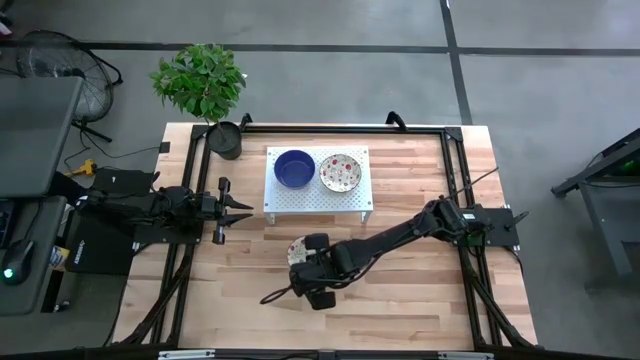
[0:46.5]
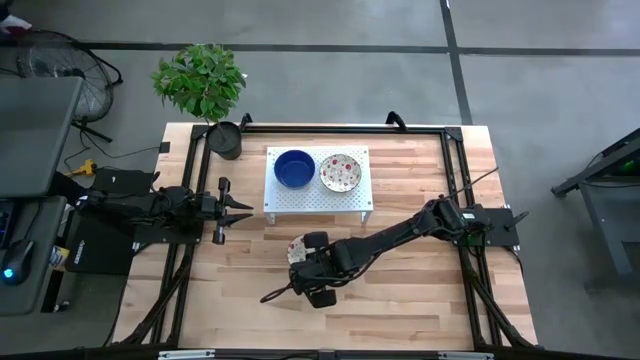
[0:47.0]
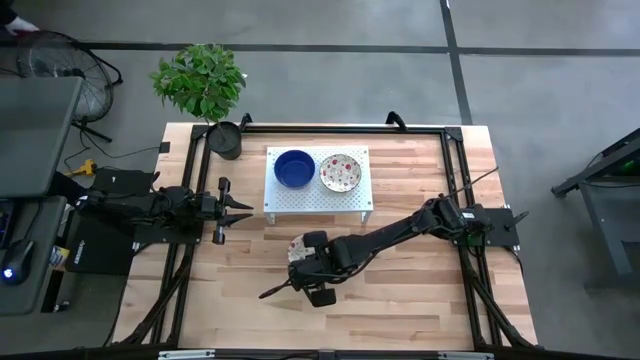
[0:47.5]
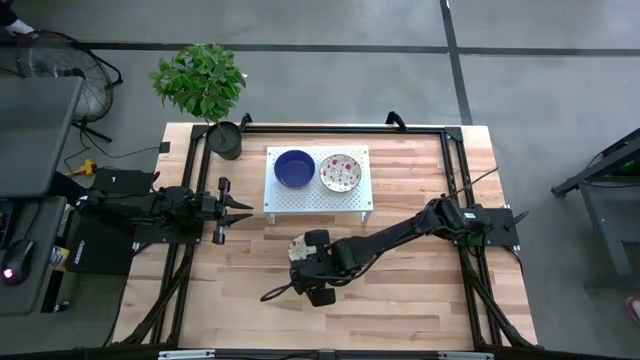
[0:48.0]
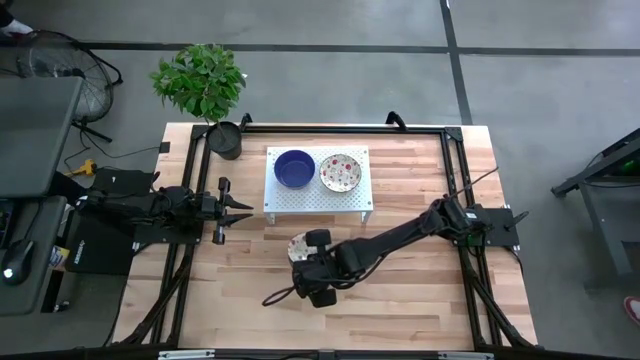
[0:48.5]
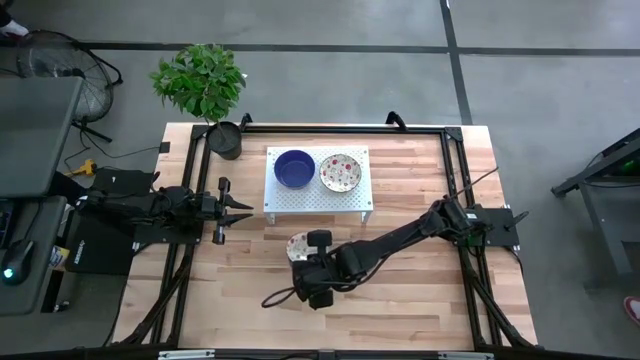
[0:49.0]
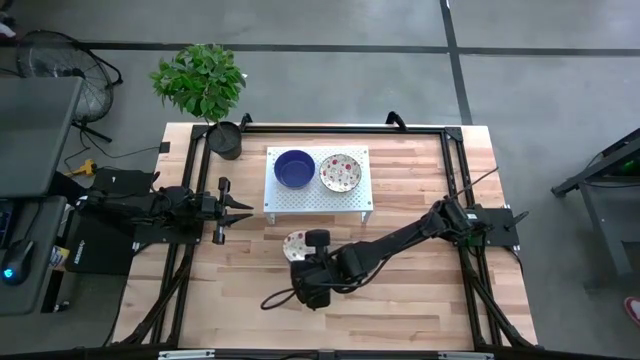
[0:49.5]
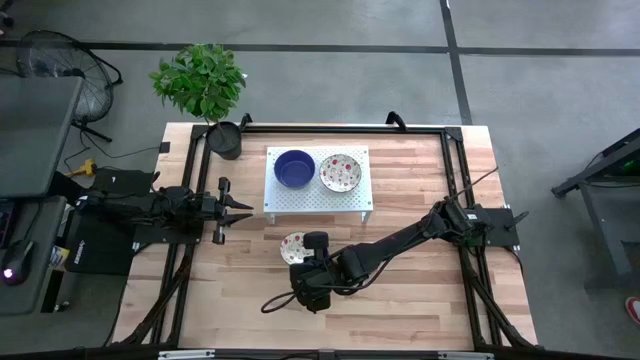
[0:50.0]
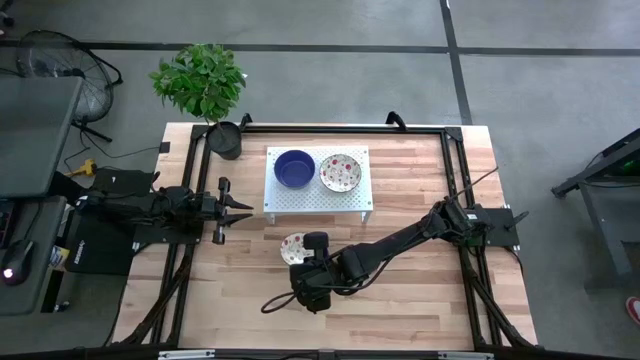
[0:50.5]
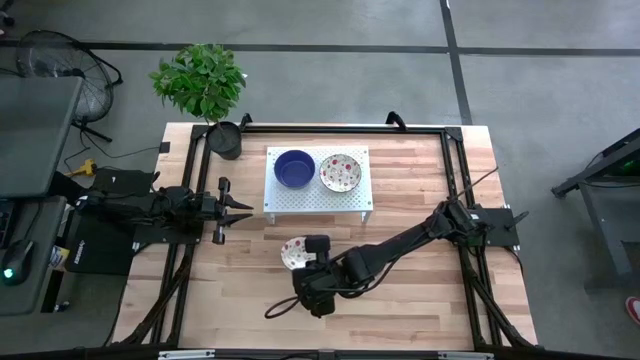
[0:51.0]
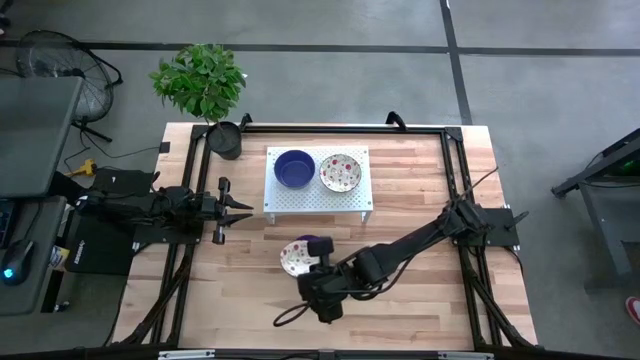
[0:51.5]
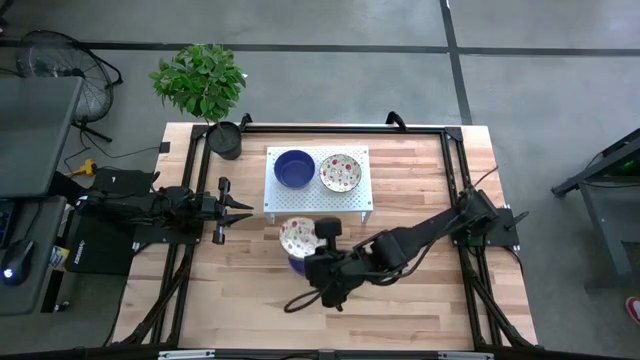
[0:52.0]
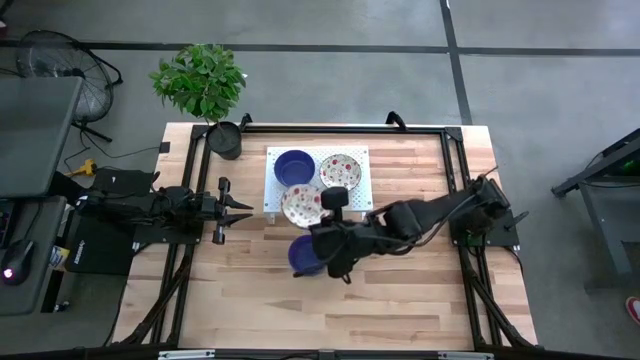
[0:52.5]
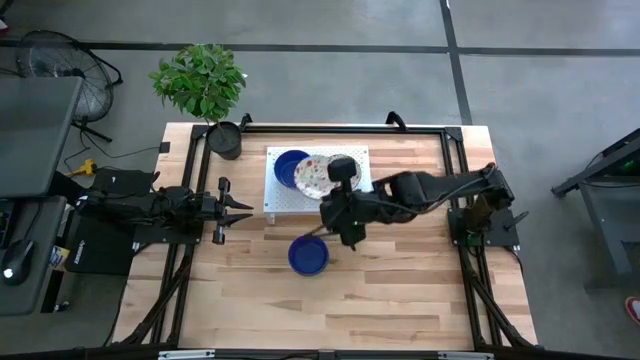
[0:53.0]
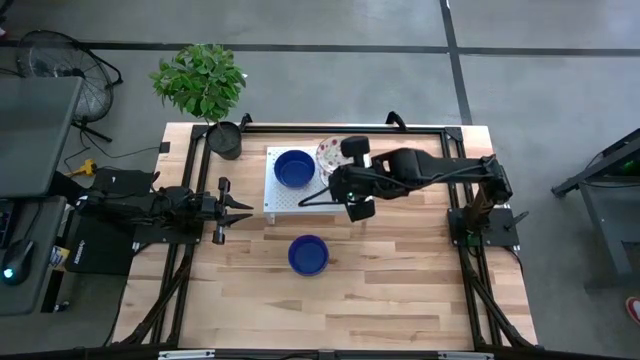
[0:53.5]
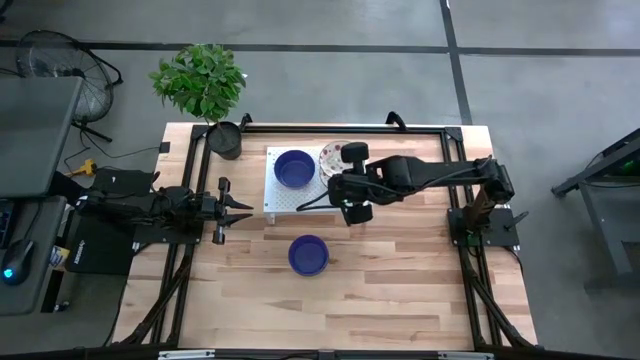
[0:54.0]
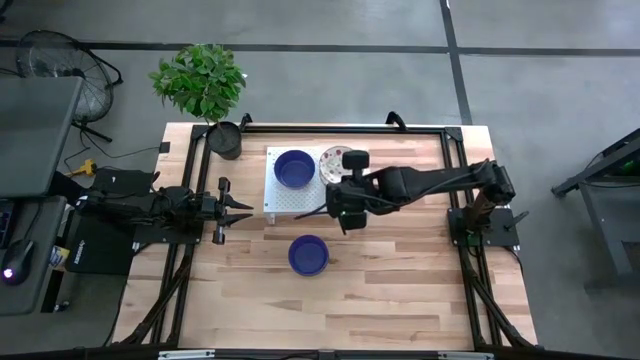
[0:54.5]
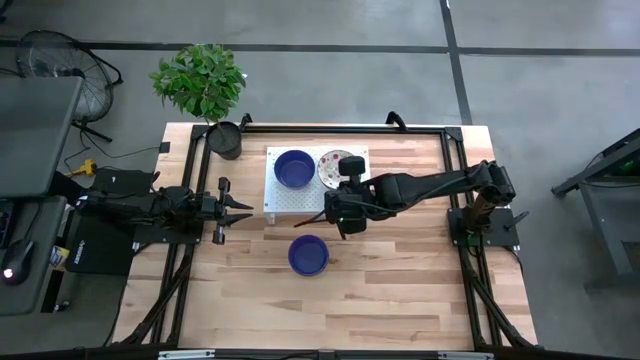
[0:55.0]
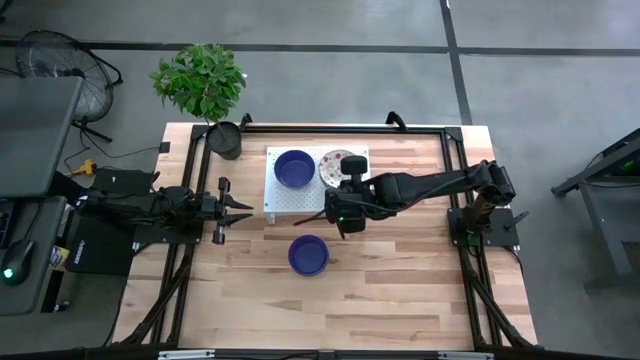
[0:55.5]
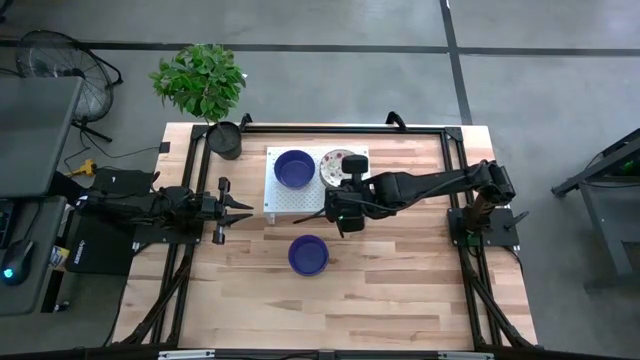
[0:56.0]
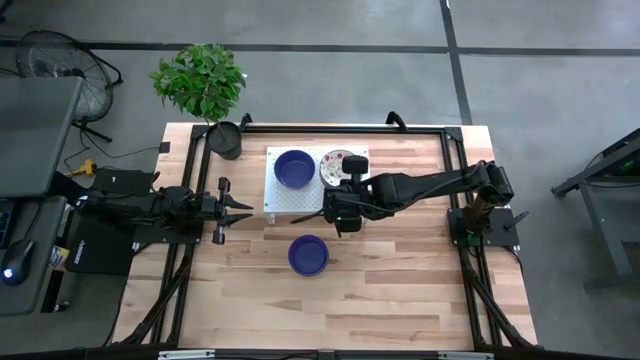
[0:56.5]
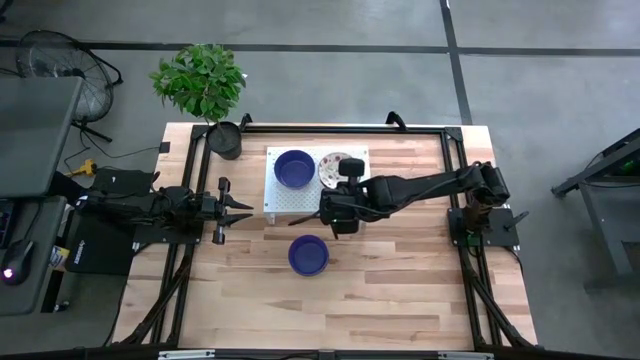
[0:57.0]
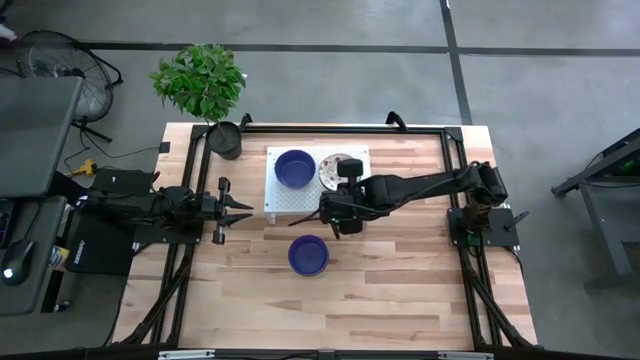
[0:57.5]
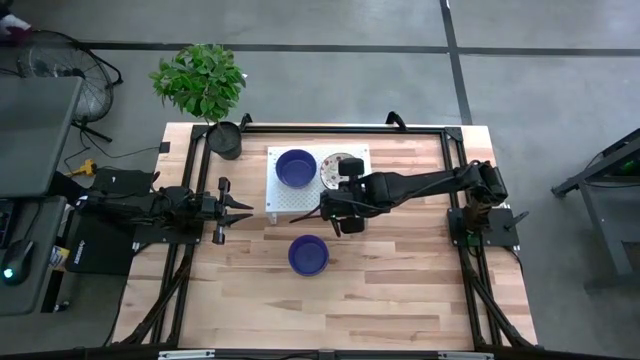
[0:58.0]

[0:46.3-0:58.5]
Task: Pick & Place Mini bowls
Stack the red patterned bowl on top of the red patterned bowl on the shelf

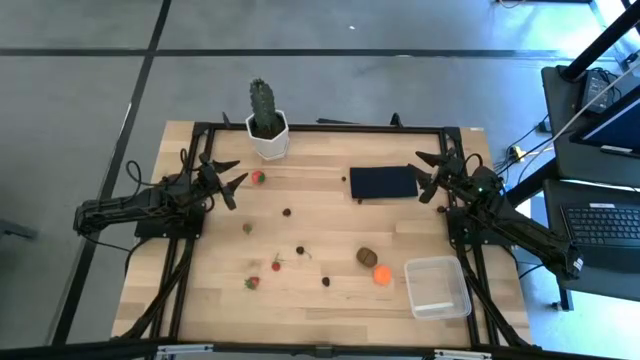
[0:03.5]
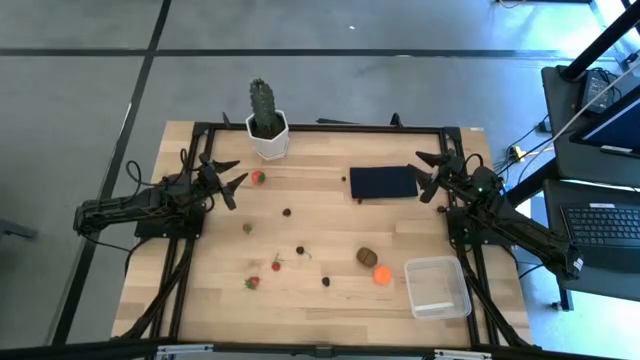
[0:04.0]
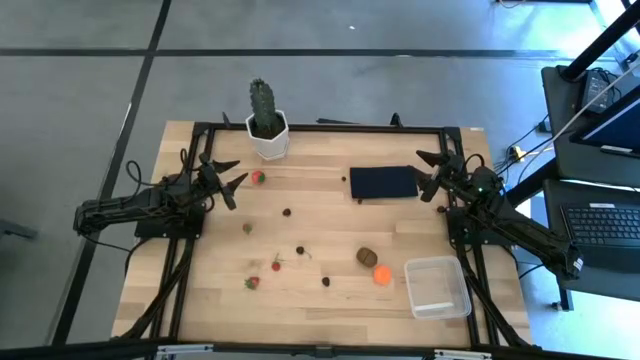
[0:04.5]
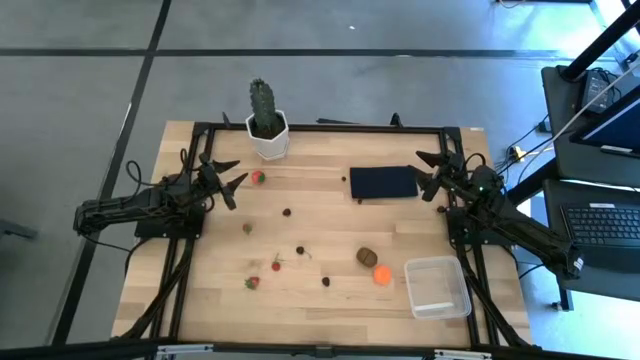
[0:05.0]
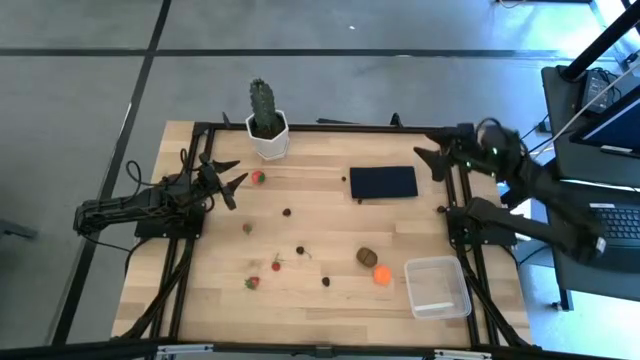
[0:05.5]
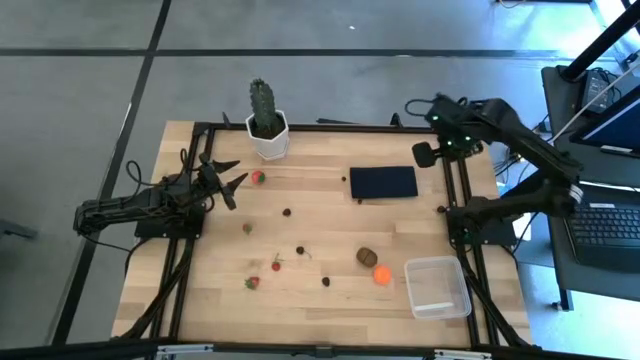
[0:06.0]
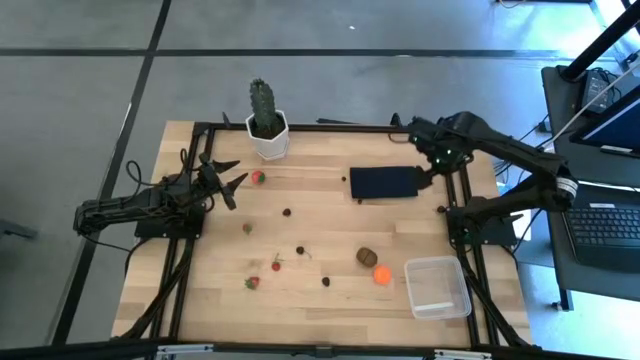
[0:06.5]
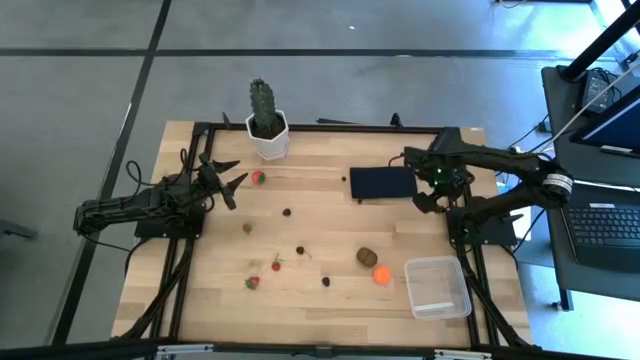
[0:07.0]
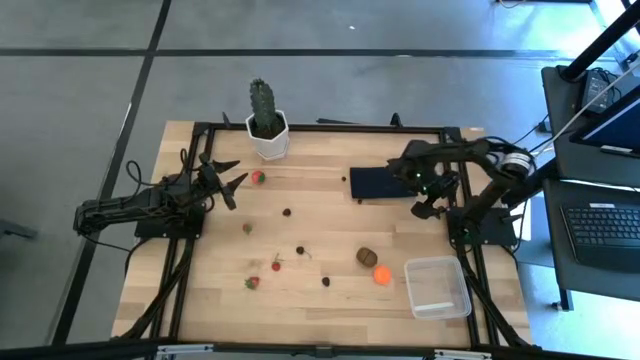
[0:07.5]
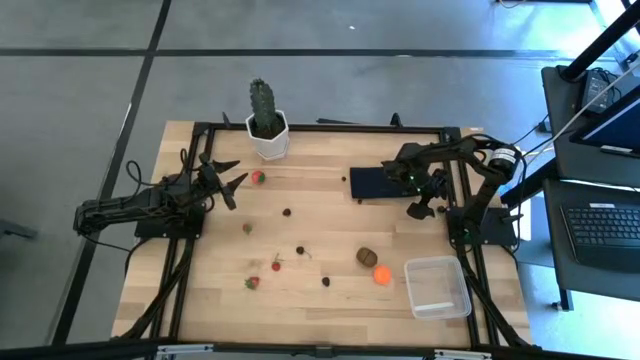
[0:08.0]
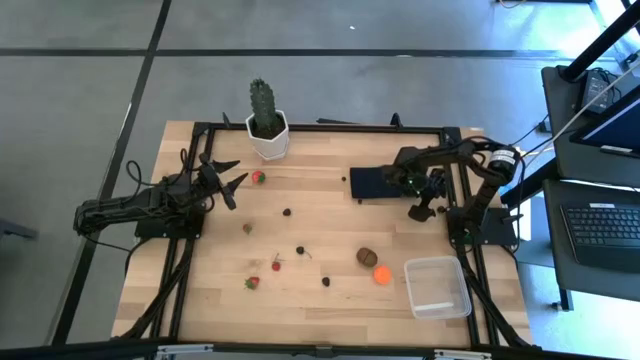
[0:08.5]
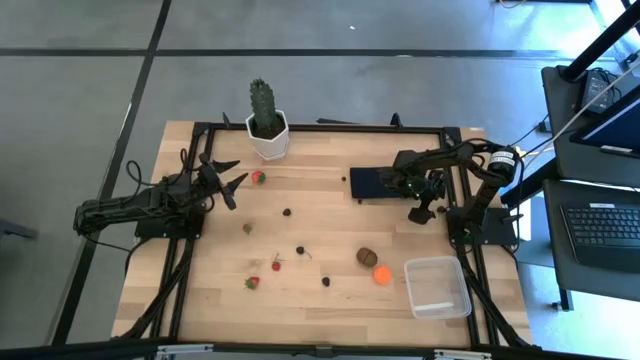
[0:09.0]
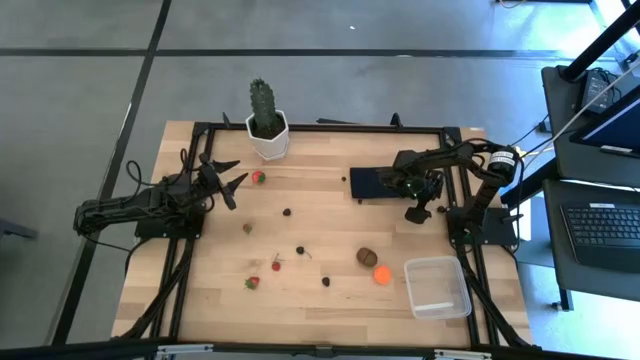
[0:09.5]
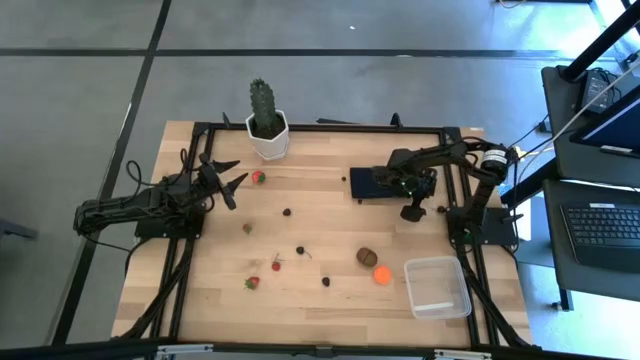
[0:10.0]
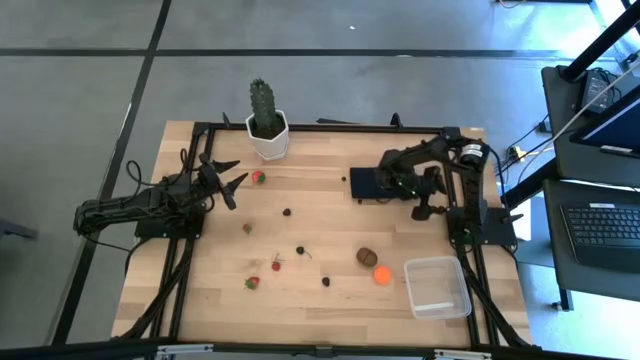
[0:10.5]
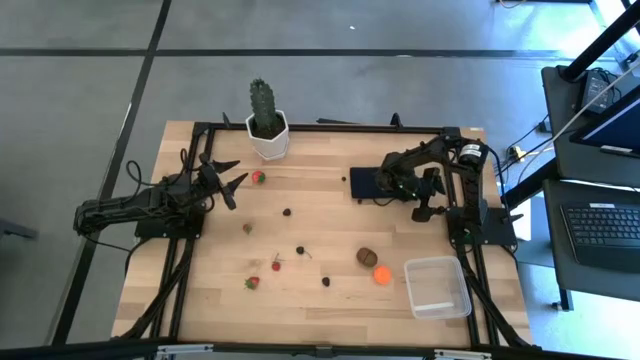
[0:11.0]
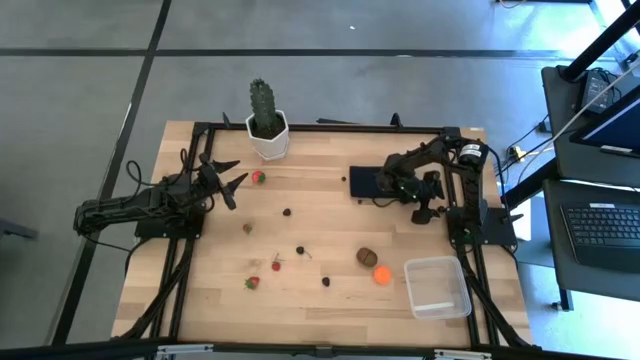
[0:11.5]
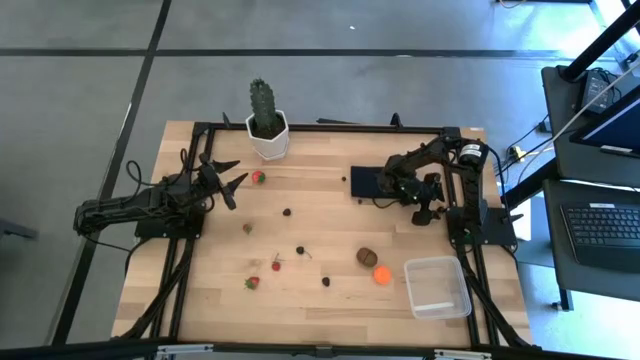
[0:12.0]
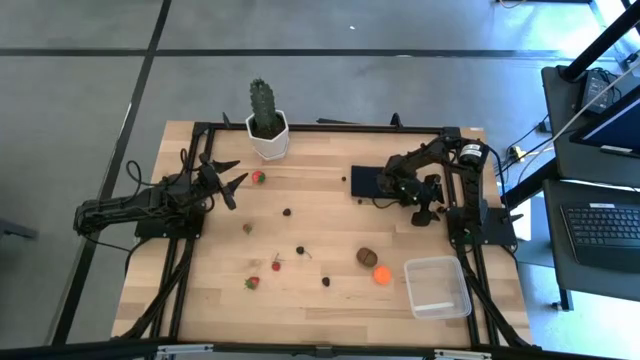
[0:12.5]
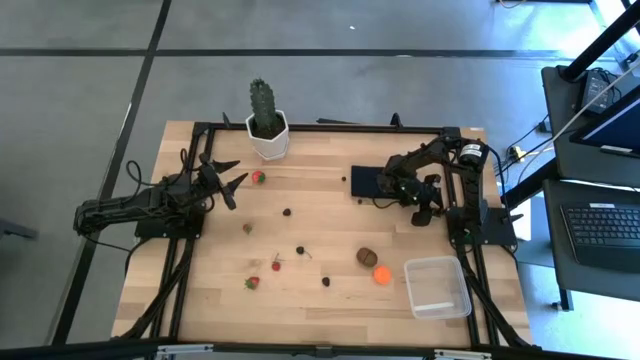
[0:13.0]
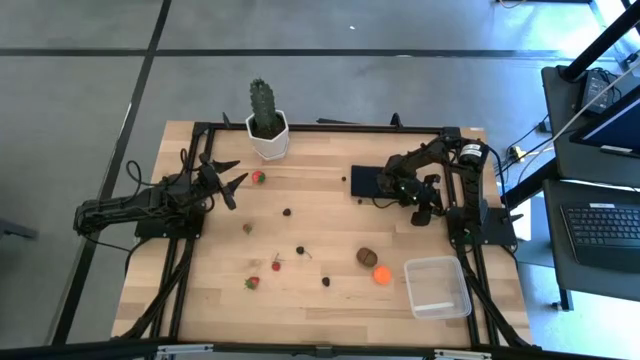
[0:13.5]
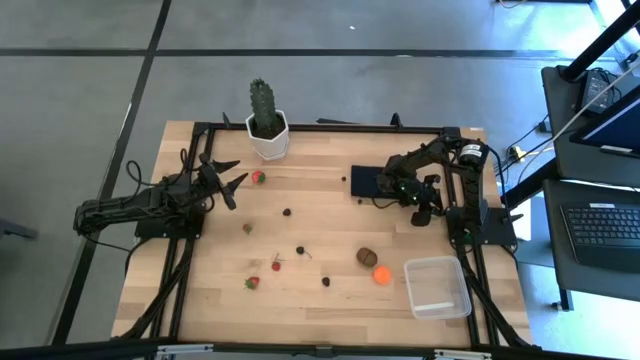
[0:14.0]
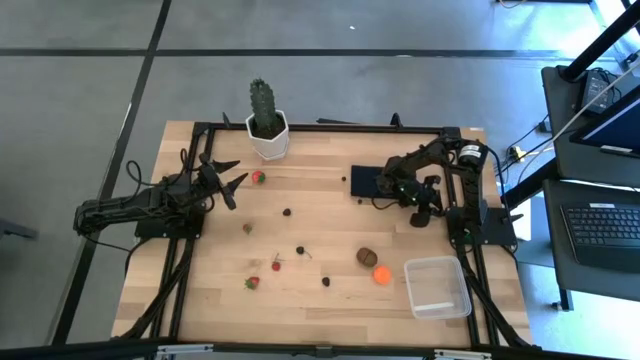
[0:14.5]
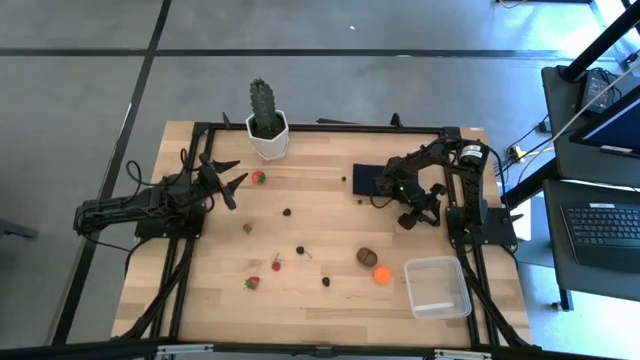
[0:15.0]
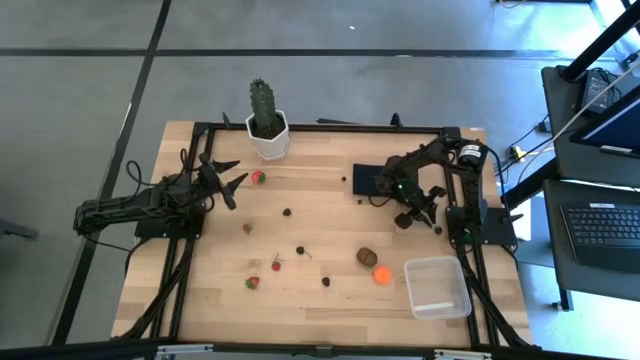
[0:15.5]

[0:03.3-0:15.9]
Task: Pick and placing Produce into tupperware
Put the right black cherry into the transparent bin
